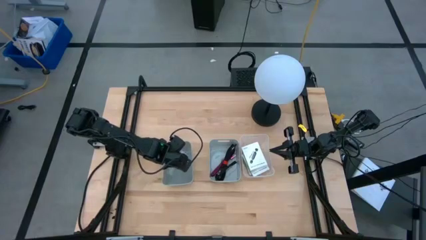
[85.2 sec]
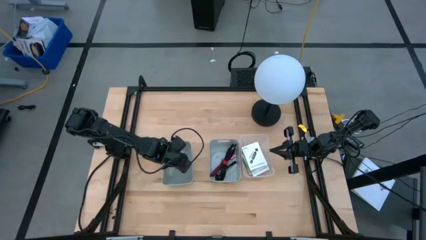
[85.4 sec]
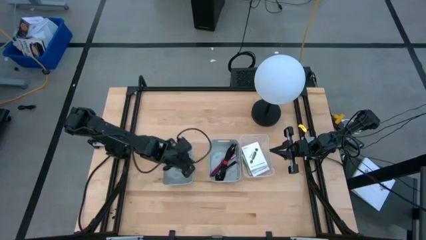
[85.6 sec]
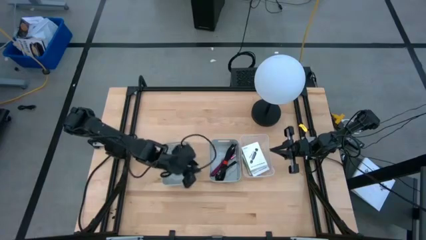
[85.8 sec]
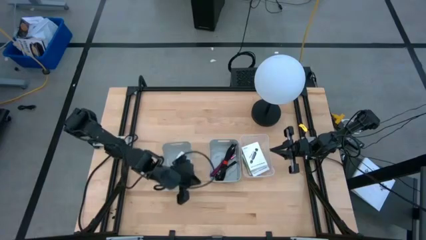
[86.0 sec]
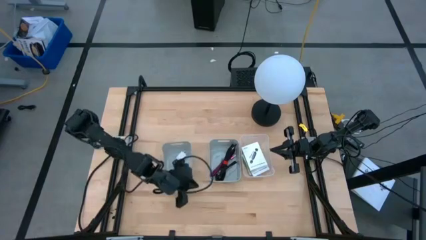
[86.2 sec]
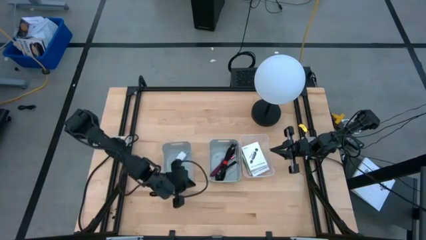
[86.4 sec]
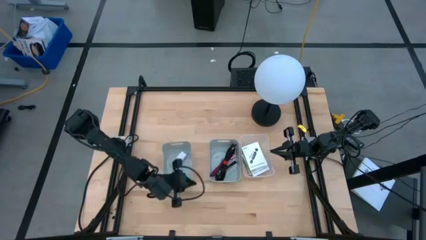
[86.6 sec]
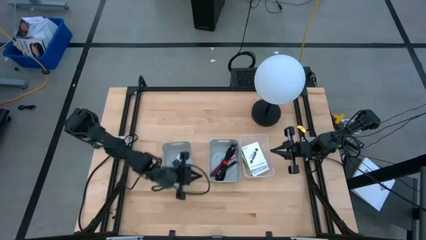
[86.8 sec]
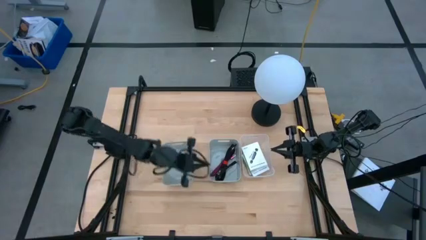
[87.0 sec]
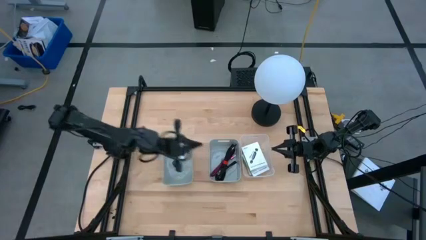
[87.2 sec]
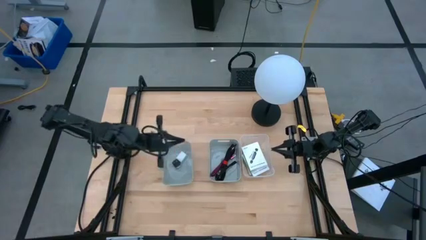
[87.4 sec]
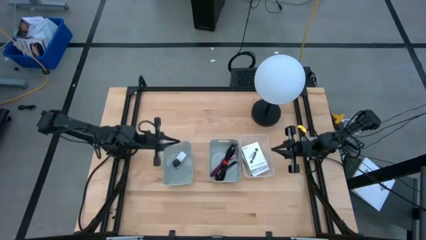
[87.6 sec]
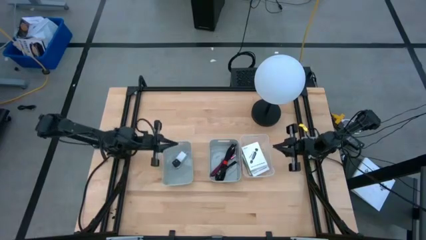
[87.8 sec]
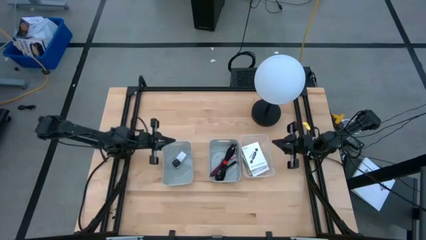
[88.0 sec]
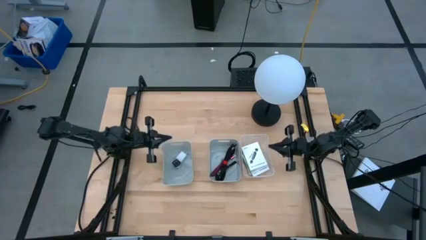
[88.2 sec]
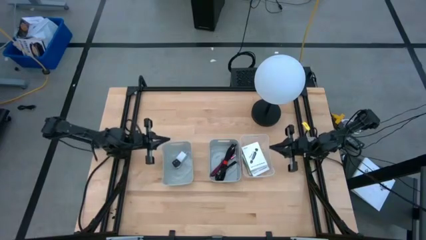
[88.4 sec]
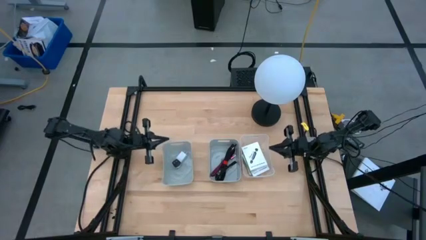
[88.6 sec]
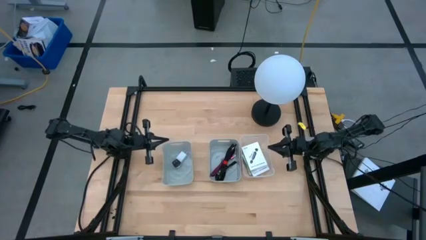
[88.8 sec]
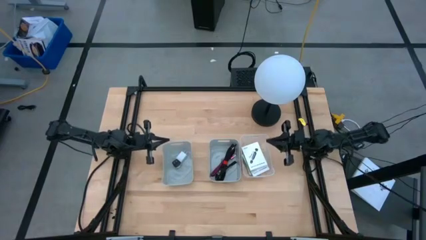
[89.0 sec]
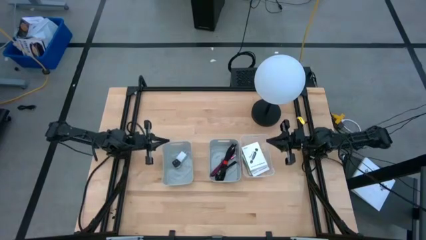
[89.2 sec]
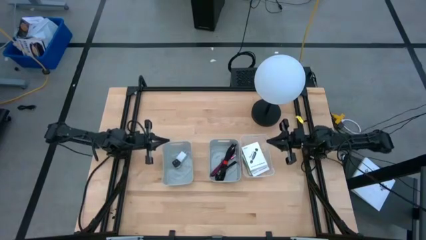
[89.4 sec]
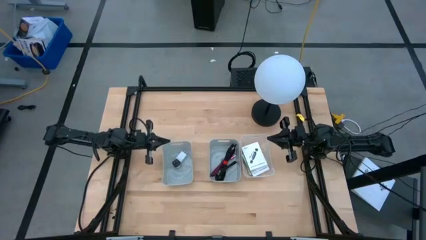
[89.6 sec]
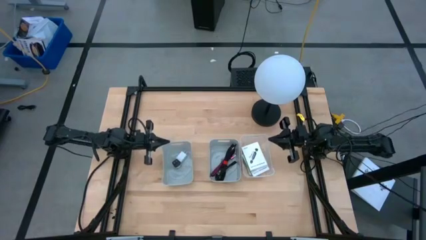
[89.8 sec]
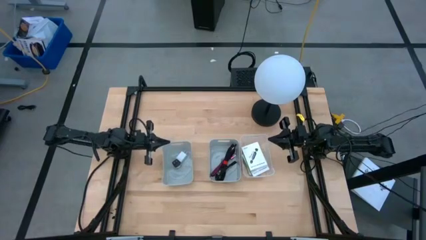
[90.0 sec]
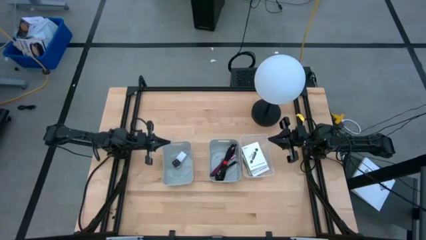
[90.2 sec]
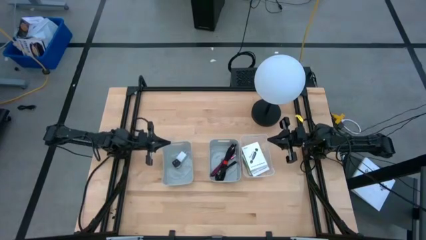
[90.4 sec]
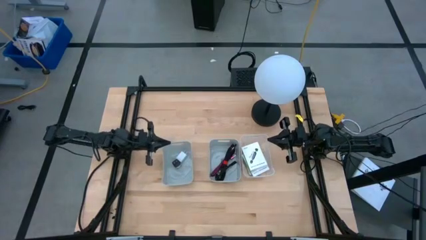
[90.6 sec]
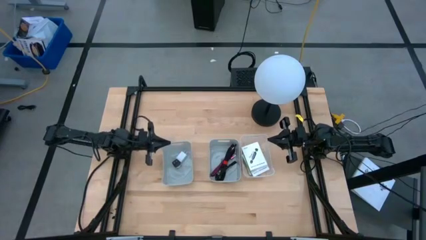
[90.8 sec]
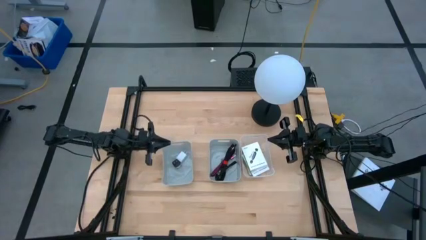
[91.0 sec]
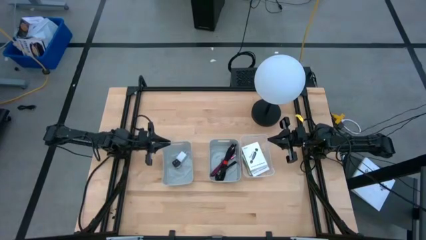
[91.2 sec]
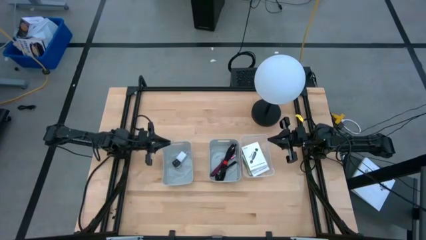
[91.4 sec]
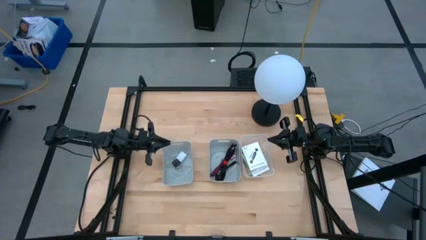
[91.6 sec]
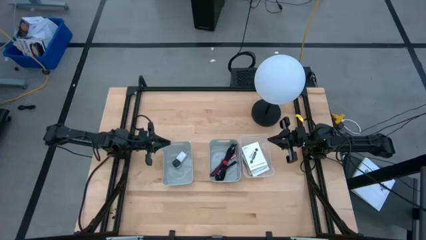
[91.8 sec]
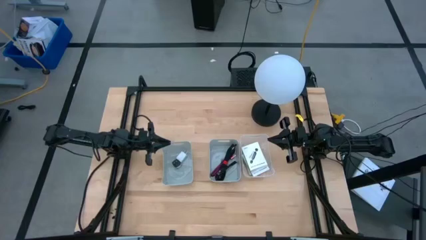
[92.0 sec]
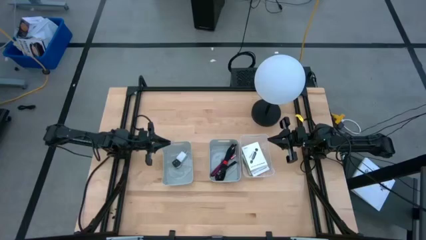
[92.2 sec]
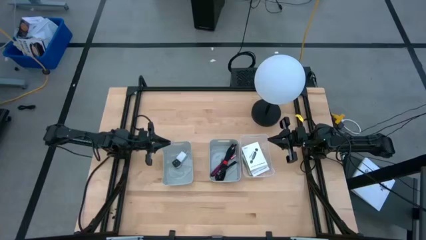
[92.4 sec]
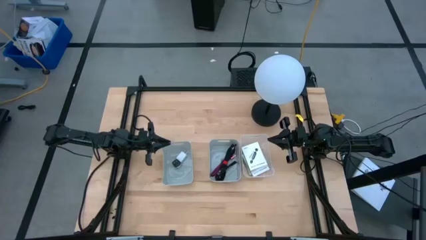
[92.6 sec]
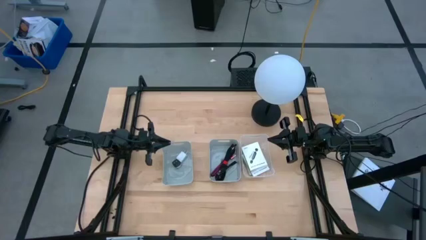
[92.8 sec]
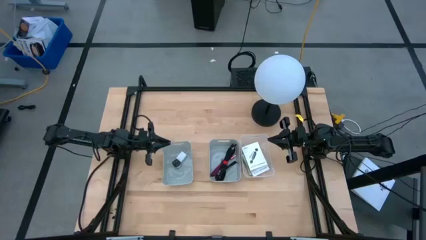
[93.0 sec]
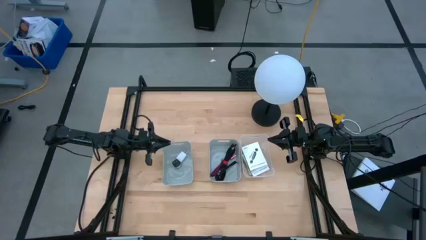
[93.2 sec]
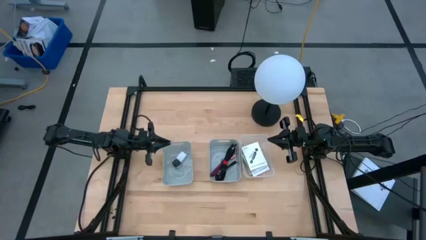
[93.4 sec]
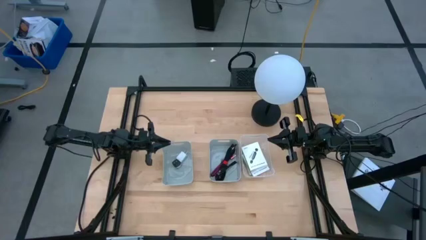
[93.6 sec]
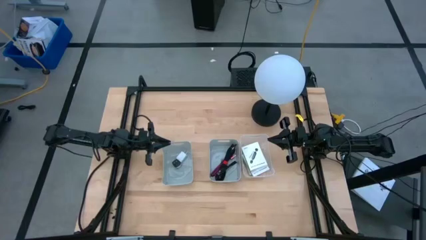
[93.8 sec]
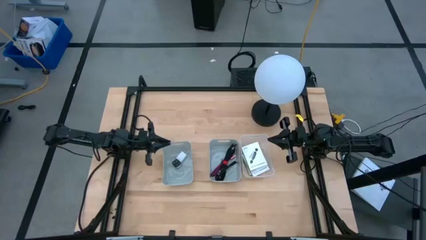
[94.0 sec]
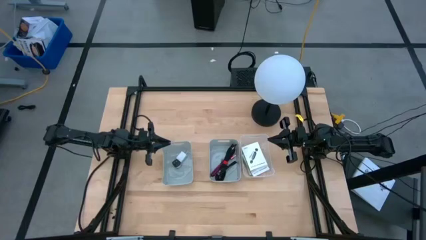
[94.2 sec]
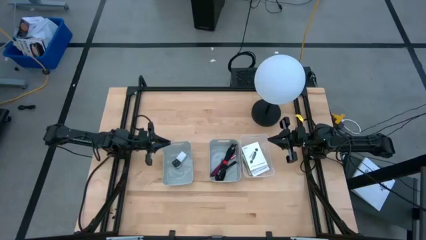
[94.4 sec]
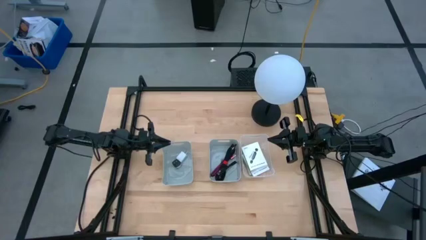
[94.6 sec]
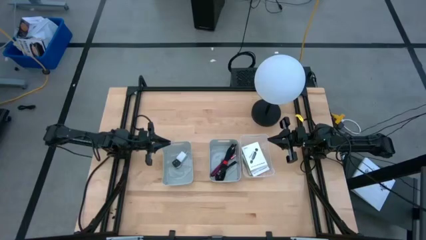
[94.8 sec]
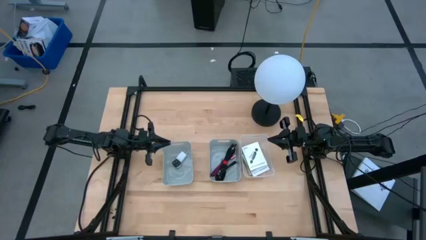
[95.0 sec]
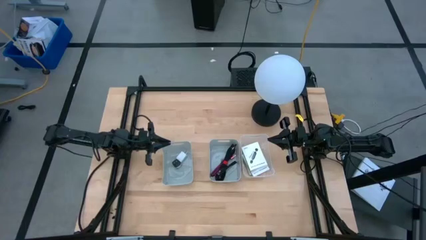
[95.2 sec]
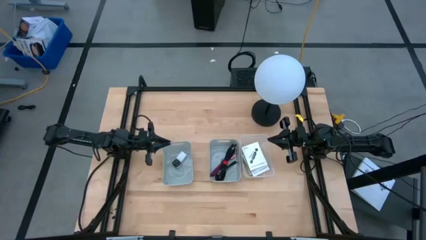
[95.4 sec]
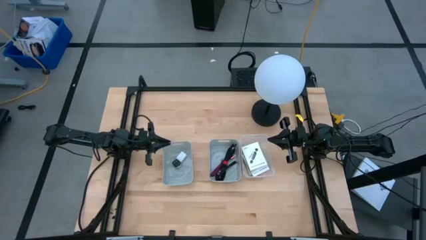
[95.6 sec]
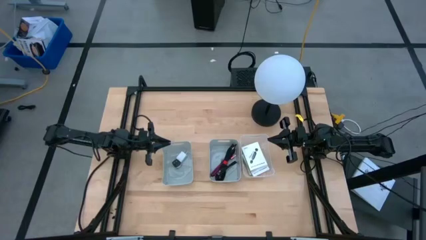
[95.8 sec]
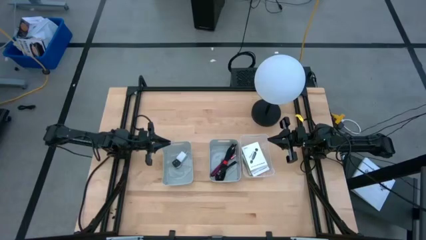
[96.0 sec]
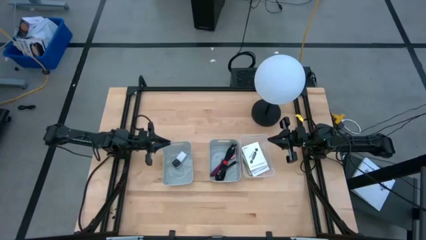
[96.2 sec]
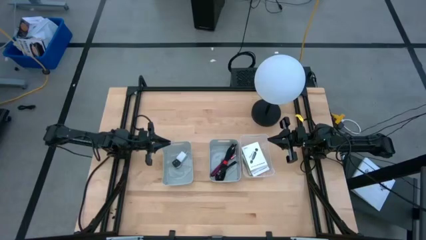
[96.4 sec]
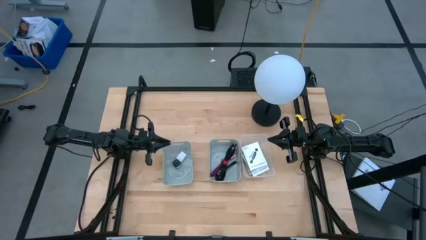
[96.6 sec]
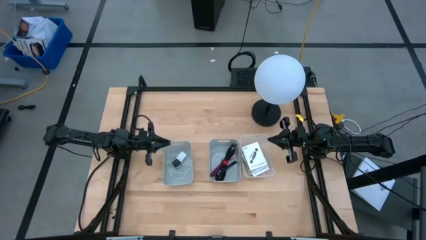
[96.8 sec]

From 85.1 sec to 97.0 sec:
Task: Pick and place items into bin
Return to Home Position
